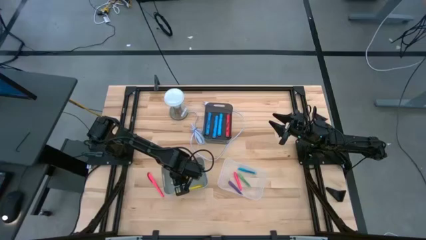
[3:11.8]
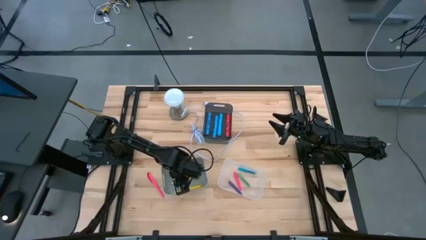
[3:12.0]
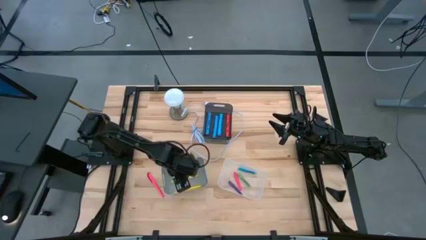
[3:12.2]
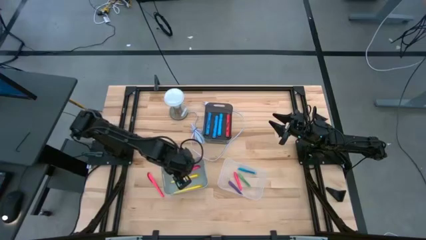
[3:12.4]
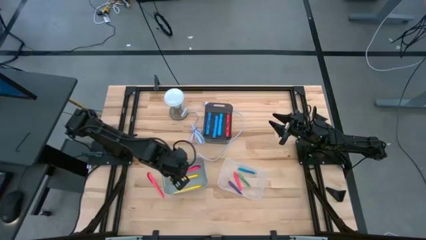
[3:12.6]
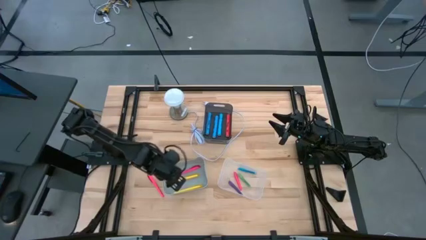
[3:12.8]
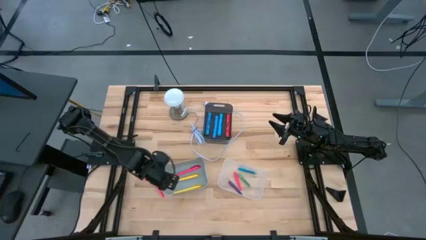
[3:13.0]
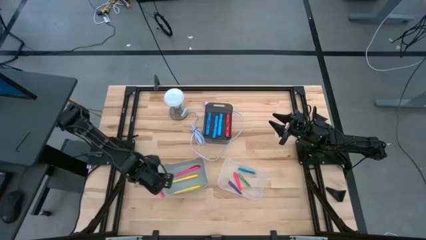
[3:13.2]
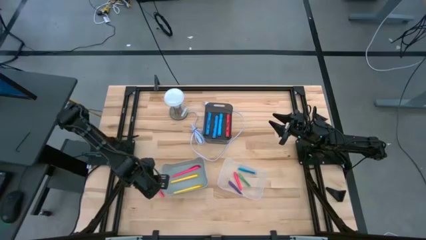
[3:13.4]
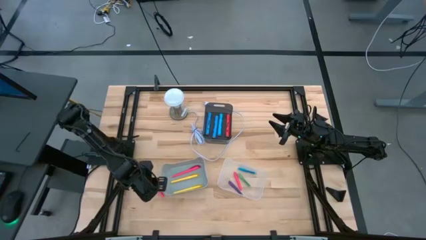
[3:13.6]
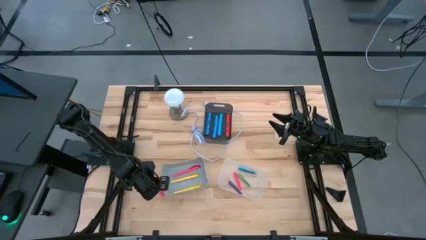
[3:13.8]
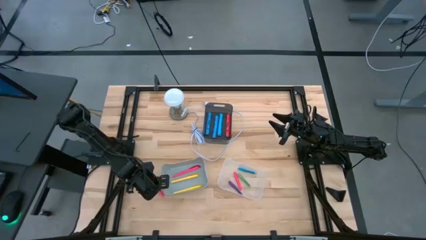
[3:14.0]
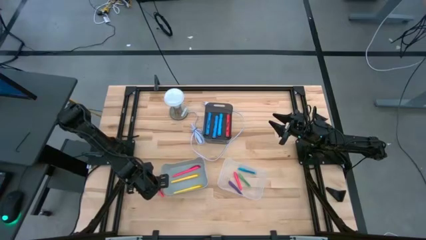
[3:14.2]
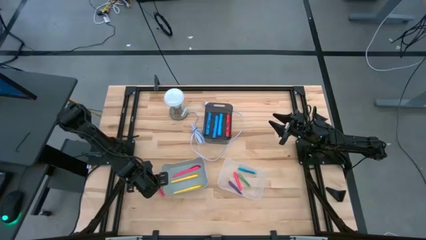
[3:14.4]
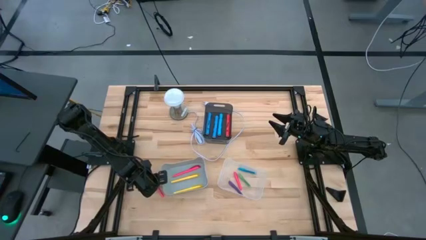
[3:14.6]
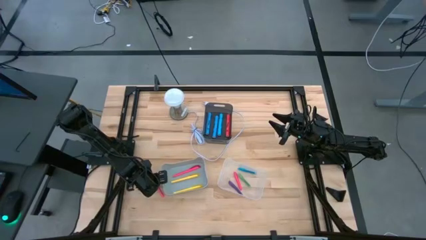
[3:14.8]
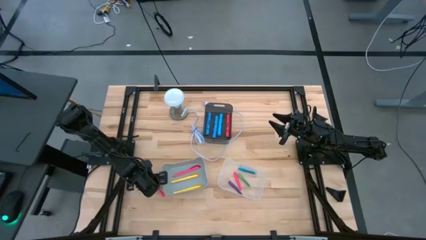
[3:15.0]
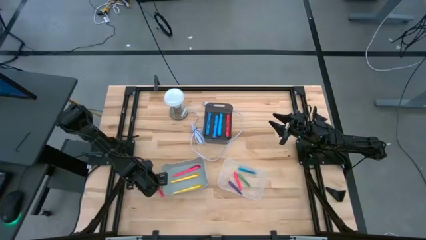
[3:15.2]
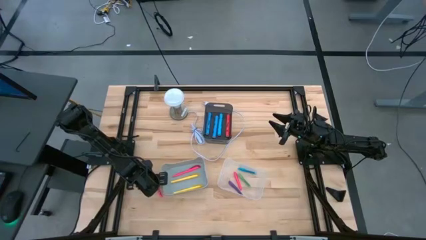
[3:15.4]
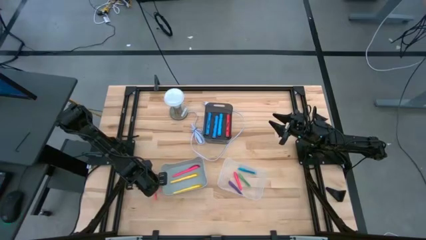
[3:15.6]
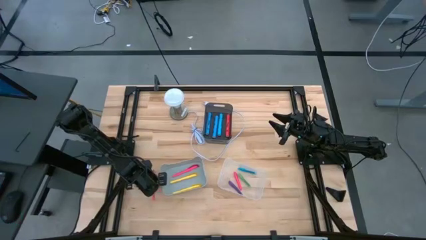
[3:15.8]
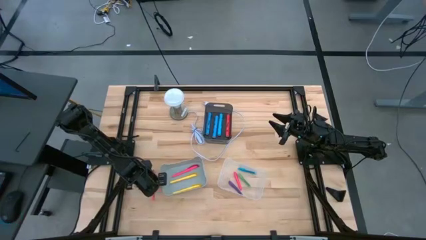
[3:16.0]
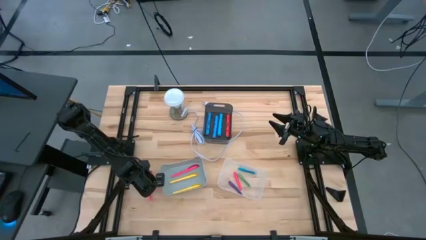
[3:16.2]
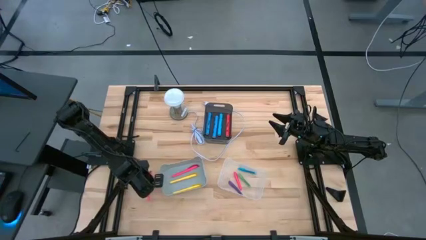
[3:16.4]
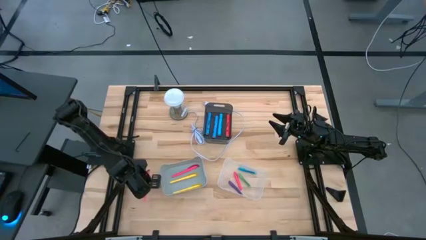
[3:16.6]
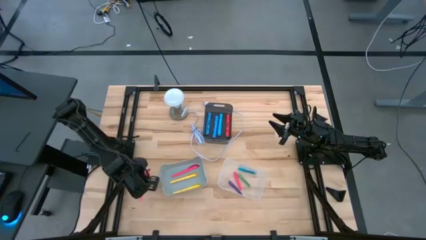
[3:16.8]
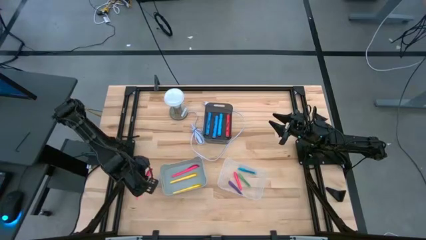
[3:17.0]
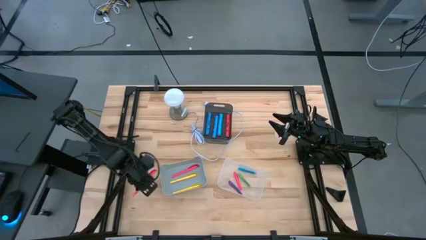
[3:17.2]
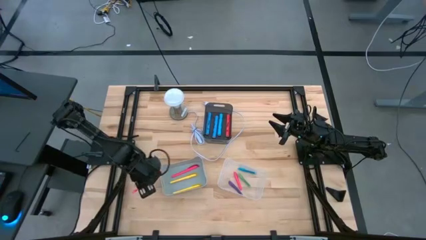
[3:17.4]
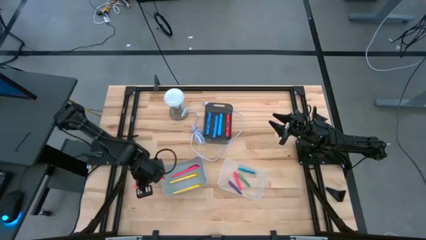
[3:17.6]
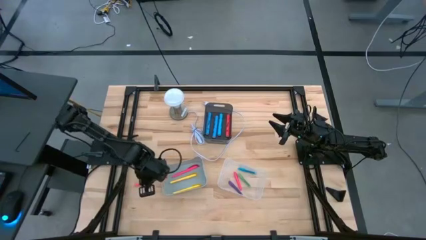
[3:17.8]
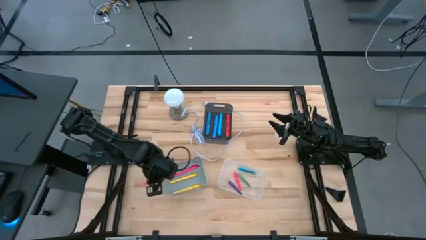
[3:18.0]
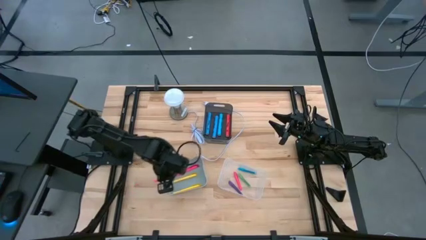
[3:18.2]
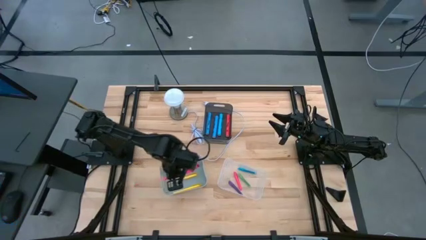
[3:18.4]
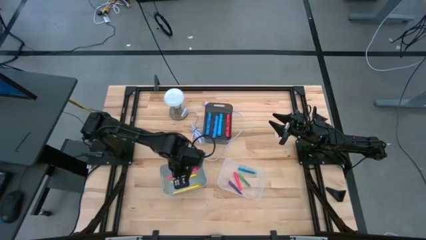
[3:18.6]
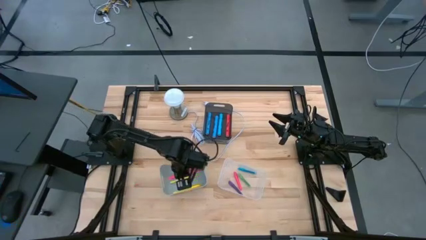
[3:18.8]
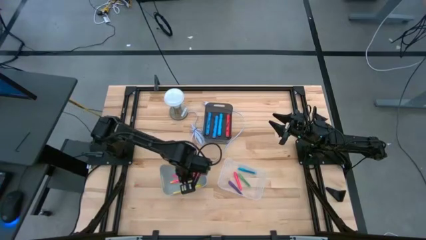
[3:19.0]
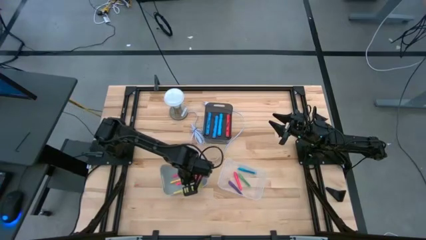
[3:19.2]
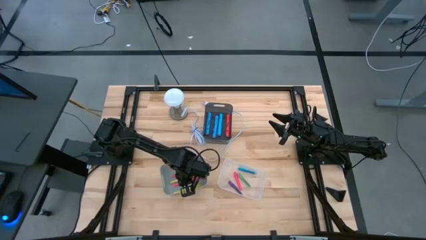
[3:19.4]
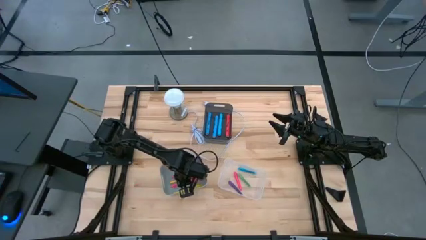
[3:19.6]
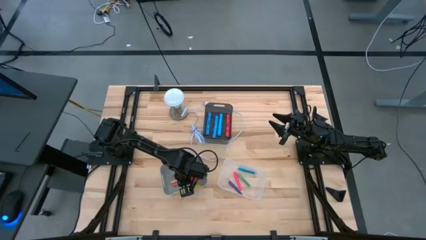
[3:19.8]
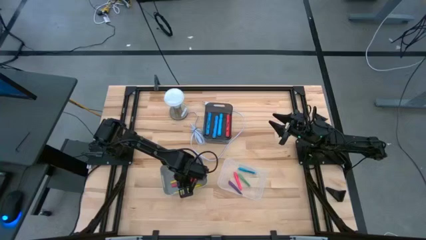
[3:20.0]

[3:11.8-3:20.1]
Task: Pick & Place Markers
Put the pink highlighter pen into the gray bin

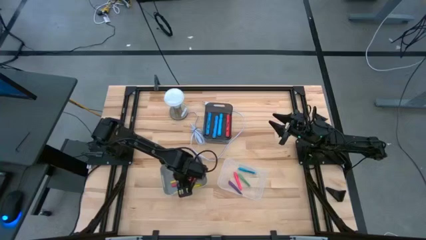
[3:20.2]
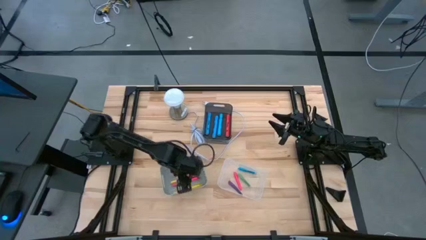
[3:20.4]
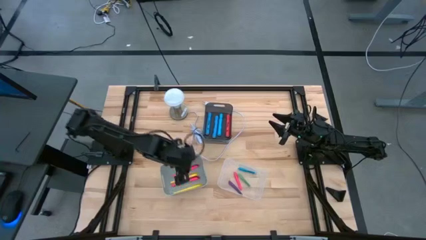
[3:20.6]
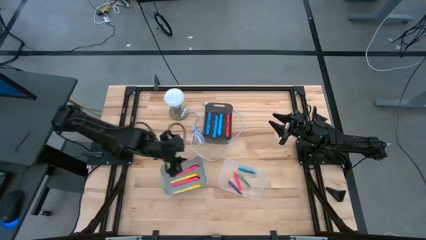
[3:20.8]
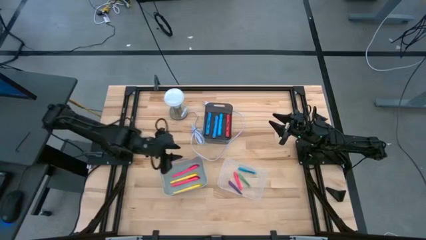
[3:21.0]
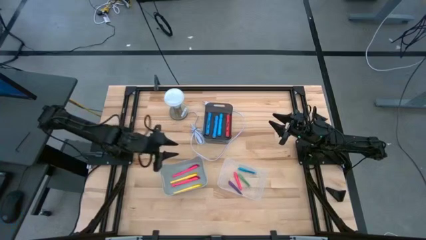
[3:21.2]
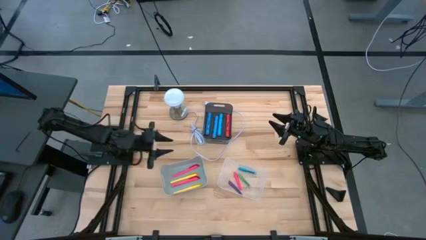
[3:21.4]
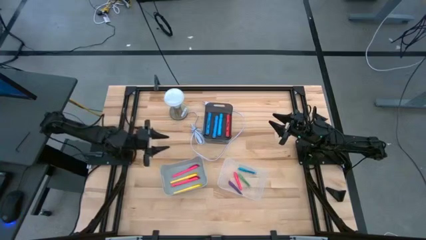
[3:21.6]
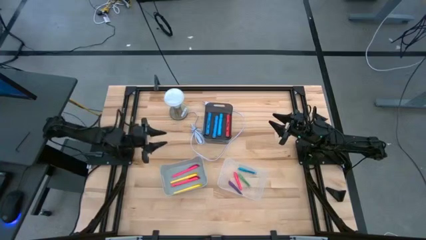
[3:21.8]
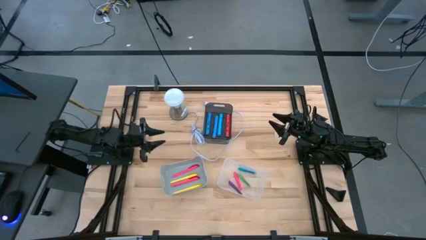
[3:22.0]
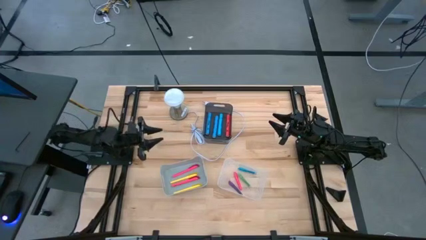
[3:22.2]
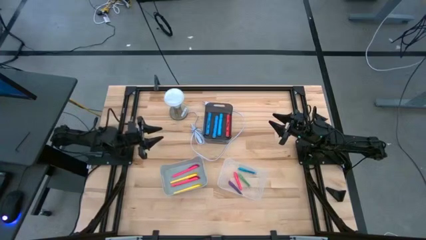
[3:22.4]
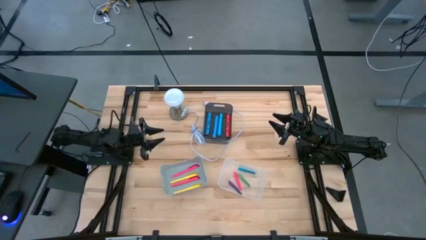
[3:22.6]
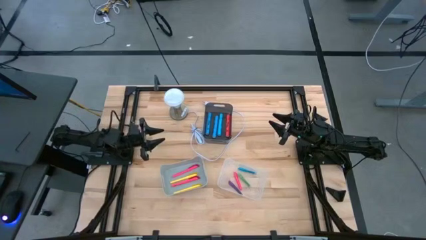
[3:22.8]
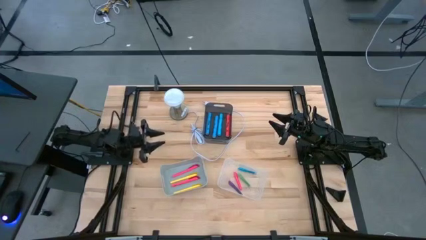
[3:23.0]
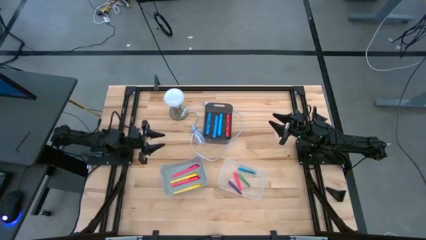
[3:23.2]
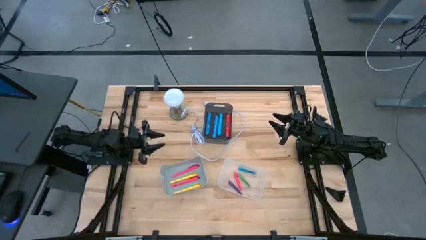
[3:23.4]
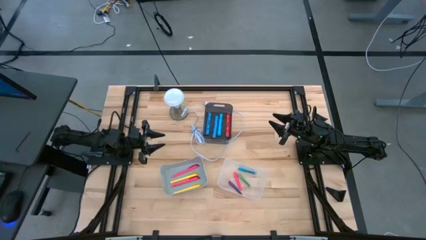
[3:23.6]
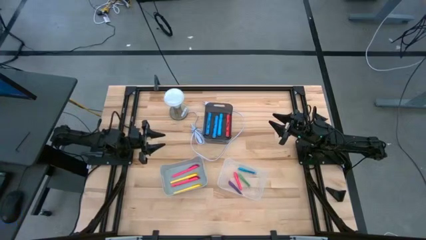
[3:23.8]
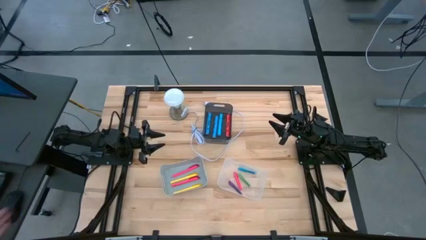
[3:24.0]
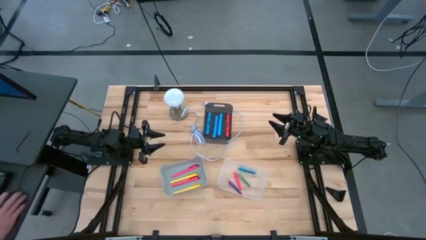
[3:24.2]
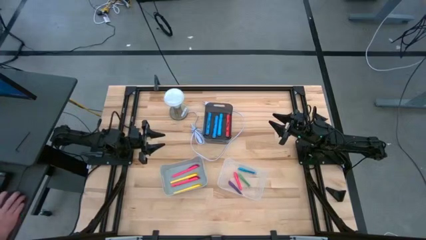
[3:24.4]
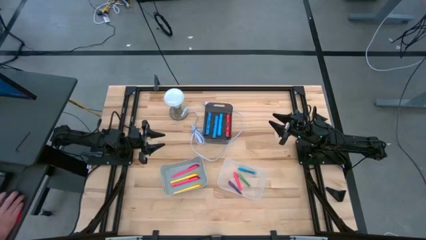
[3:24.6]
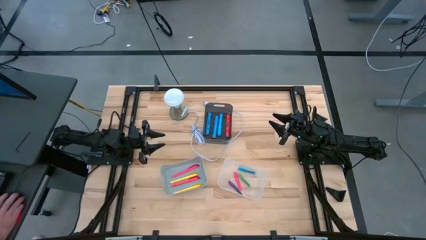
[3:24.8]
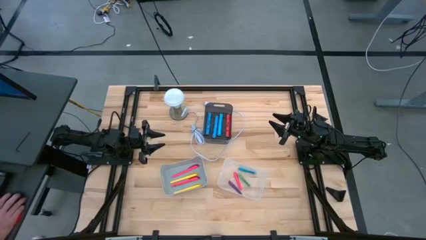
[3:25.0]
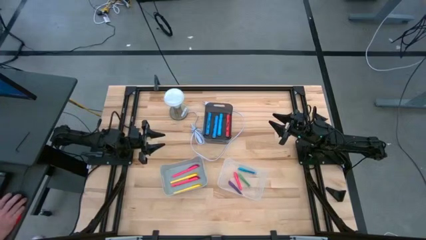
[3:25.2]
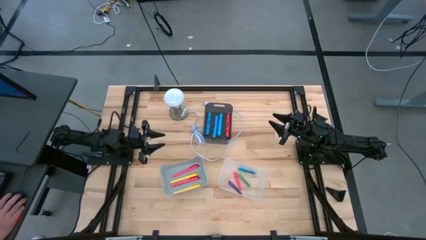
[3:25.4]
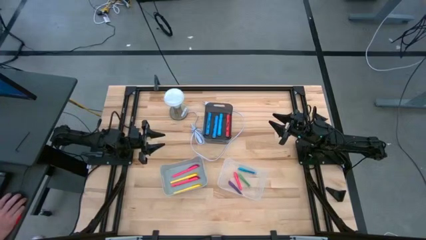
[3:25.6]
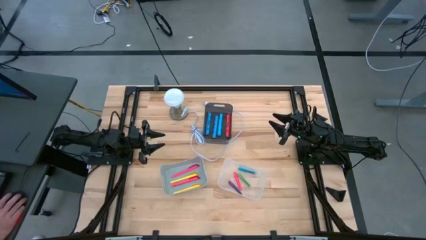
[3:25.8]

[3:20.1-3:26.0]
Return to Home Position

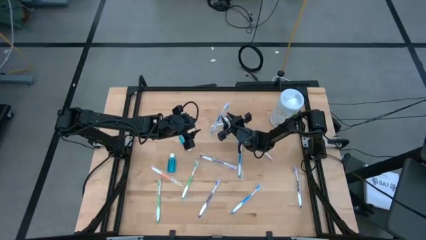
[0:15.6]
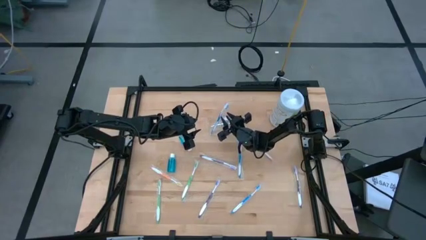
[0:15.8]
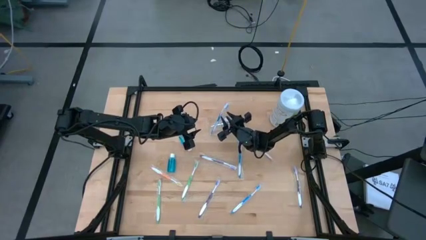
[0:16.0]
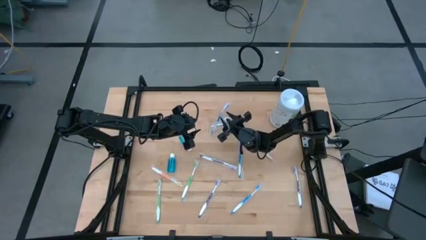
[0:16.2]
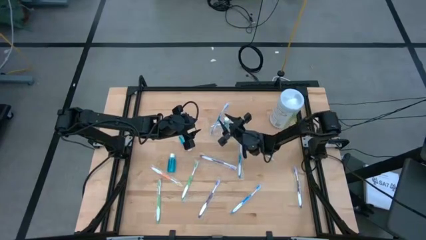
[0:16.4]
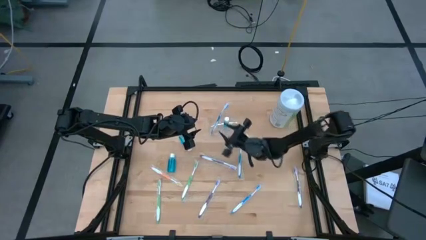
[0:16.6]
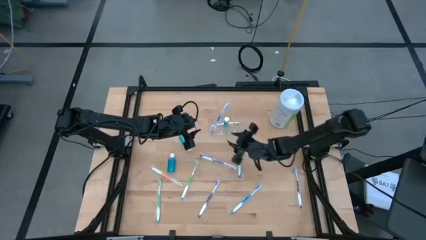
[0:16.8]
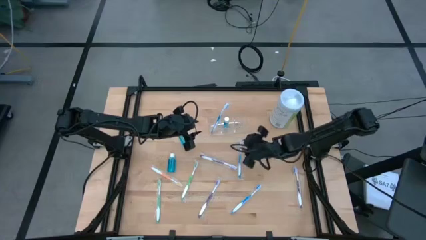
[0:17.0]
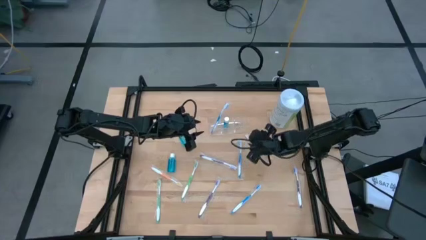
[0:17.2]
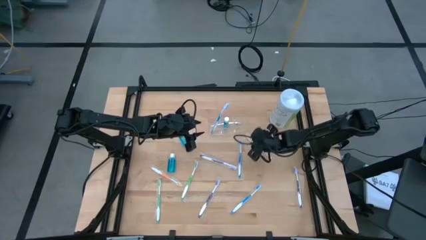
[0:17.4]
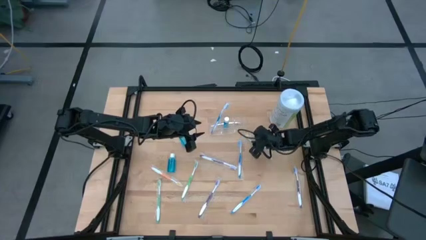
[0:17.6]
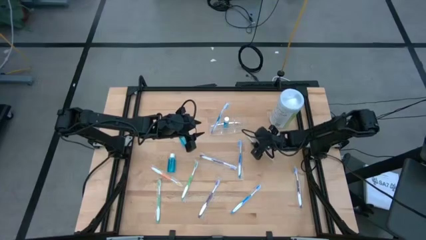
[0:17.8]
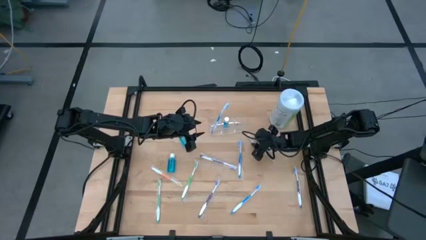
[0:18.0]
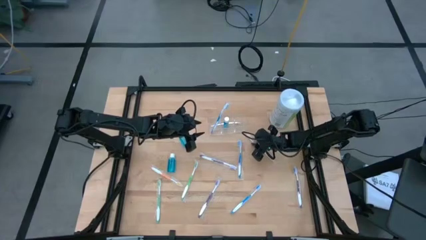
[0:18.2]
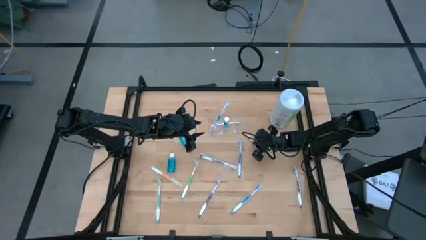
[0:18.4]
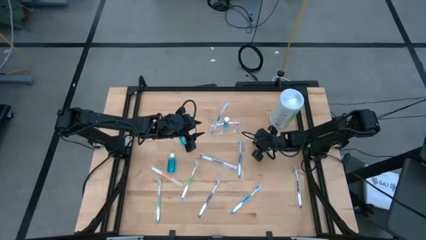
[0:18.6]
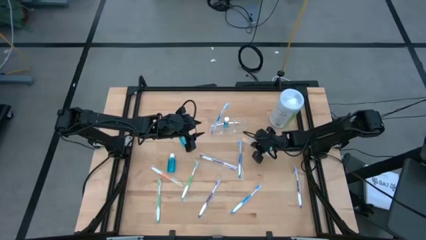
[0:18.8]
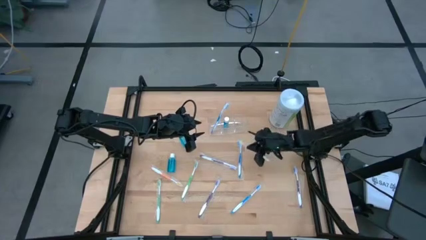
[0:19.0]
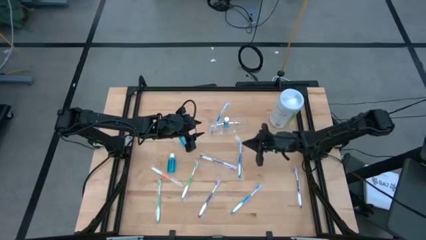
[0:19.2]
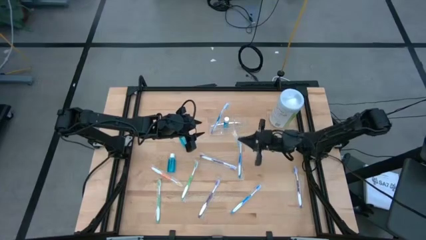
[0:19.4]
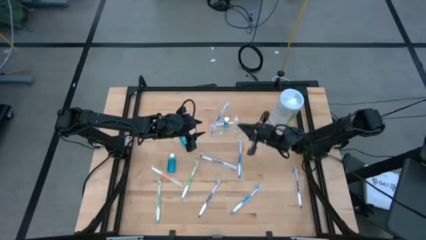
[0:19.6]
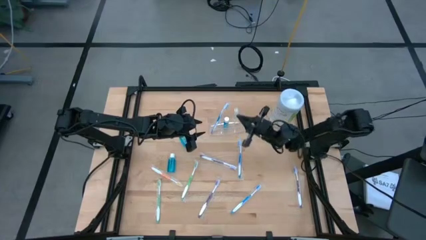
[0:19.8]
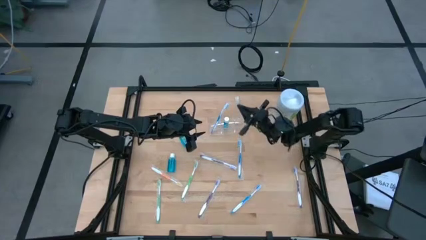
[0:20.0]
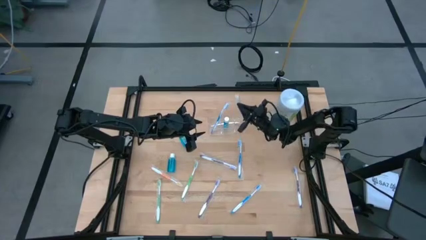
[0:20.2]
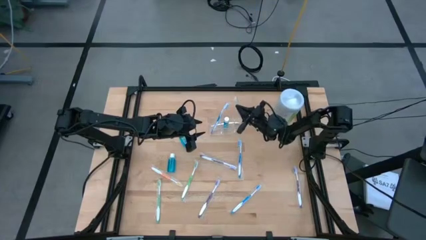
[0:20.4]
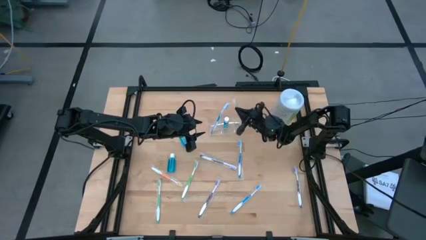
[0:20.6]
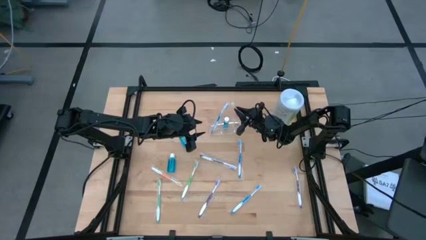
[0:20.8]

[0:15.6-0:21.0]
Task: Pick & Place toothbrushing station
Put the top orange toothbrush into the transparent organizer
